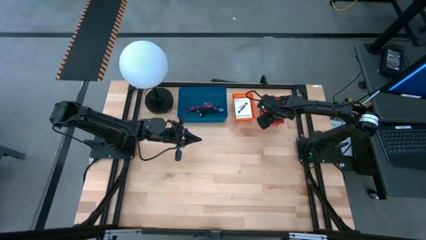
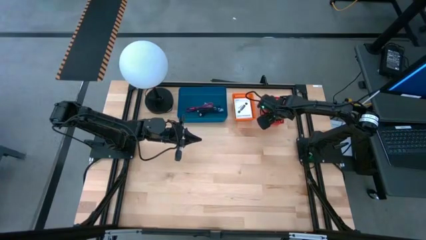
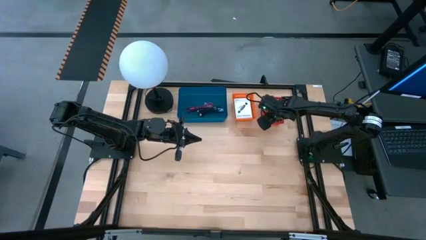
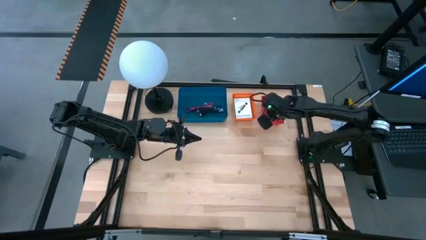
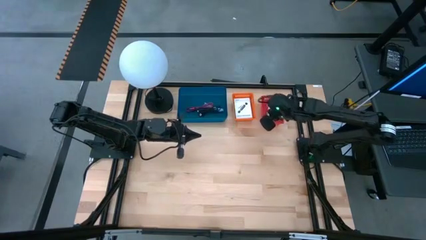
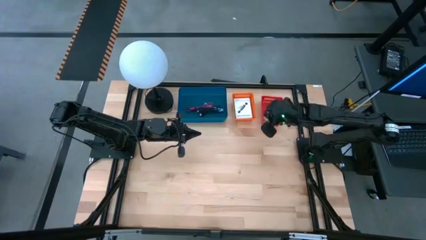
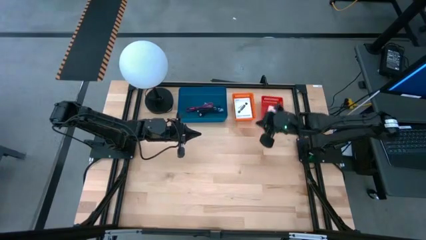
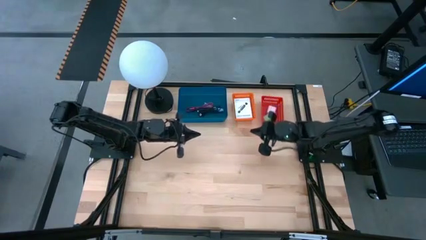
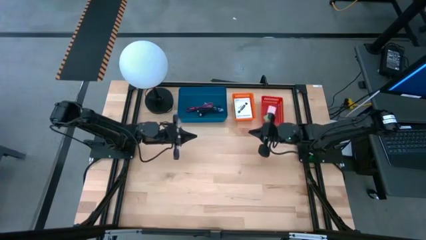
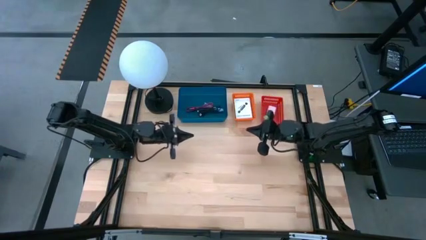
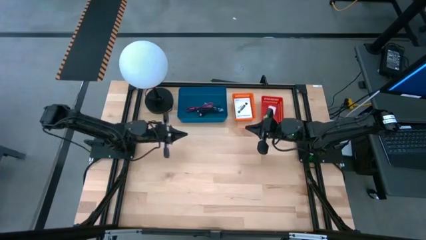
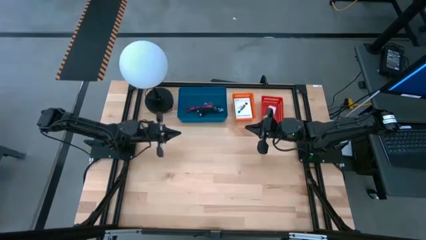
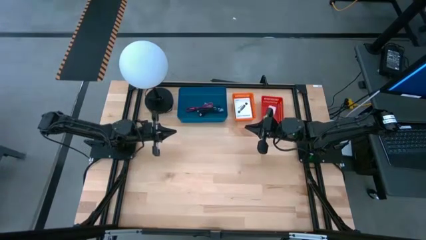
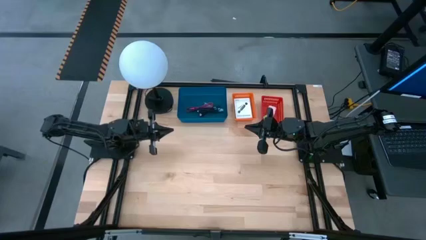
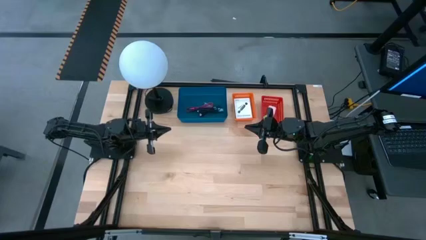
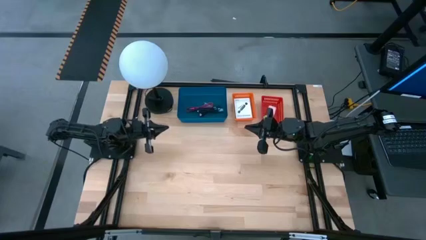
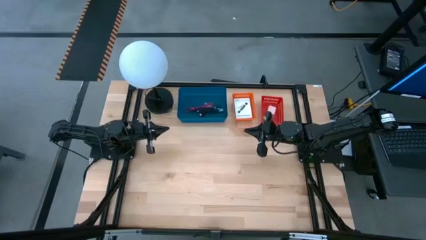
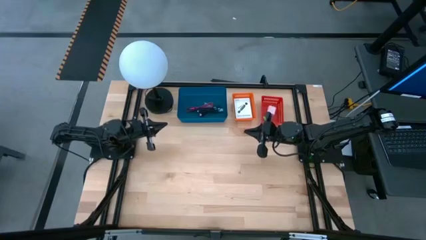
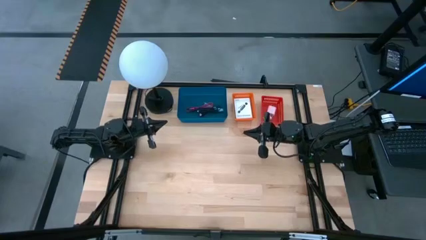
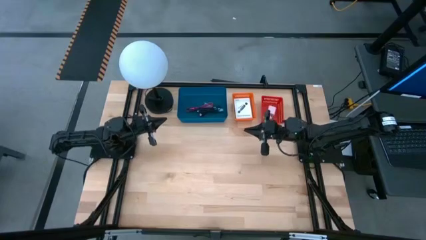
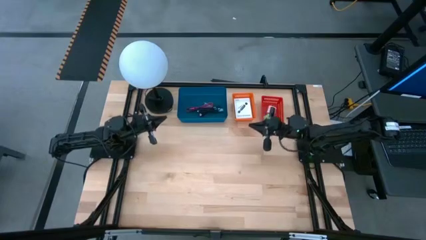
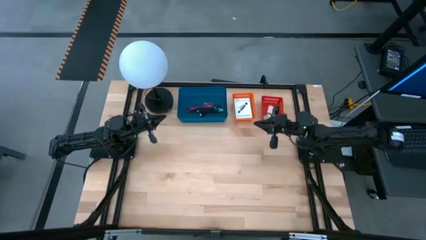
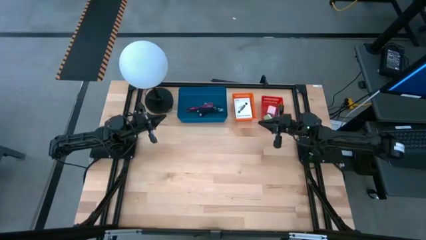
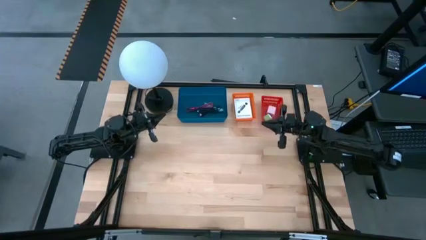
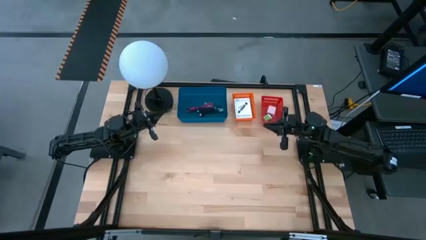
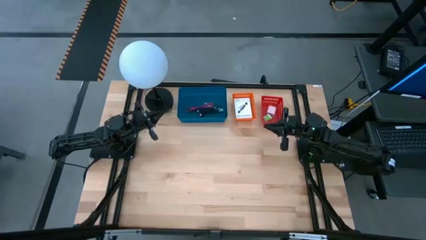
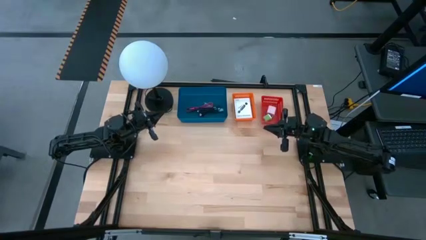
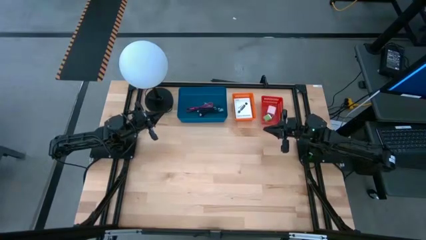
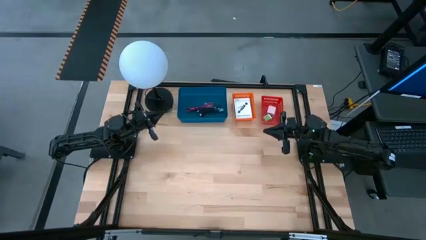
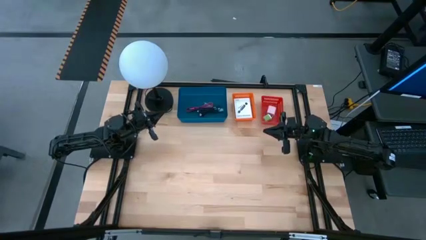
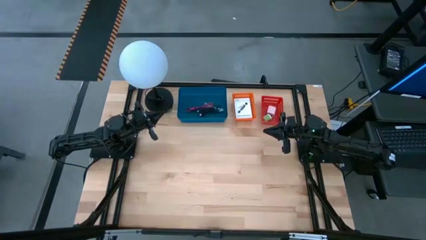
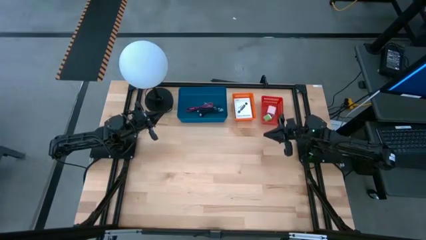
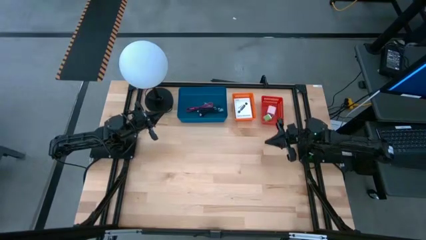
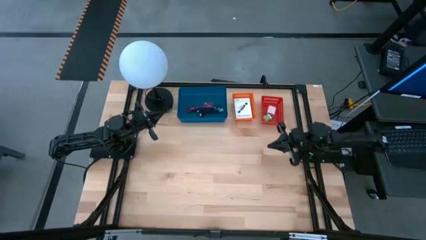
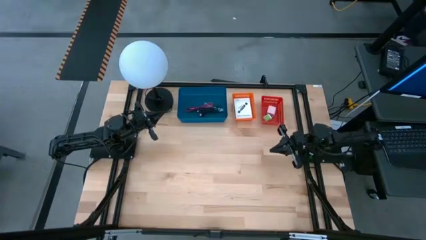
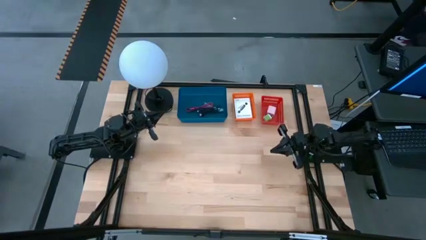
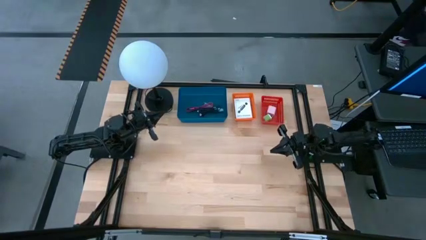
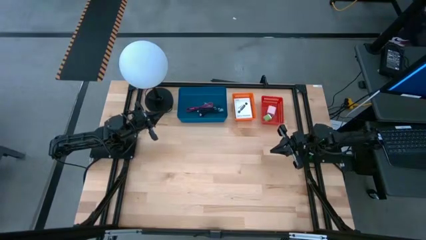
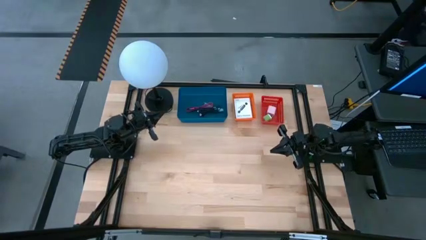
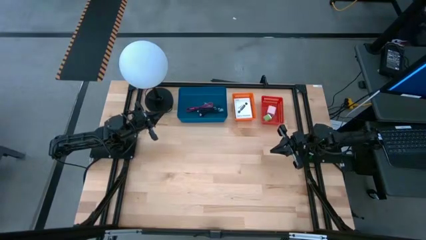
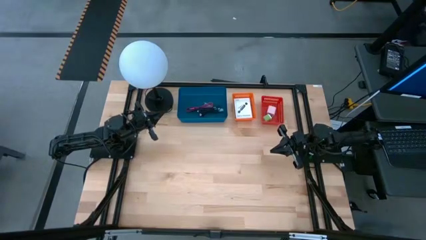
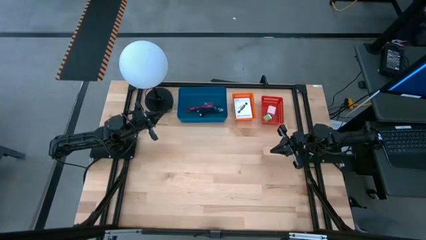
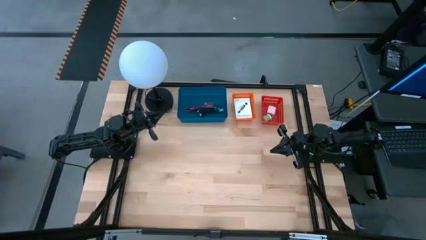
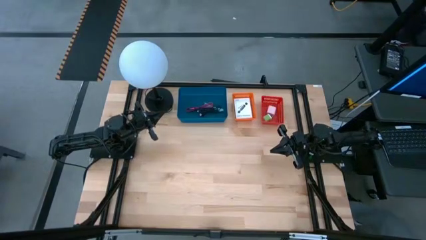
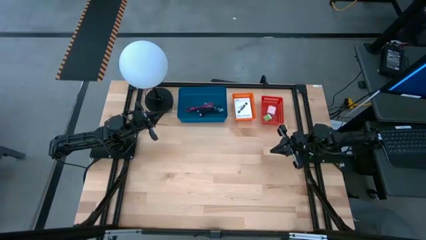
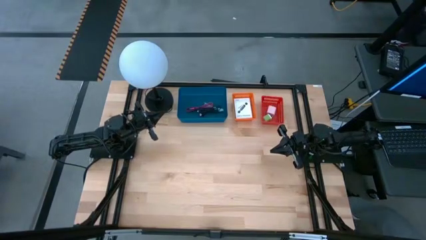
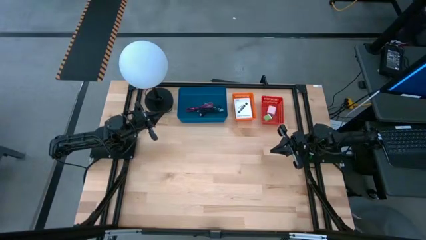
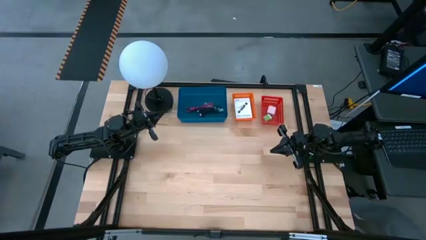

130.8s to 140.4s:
Task: Pick and place items into bin
Return to Home Position

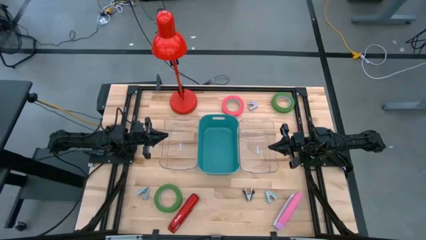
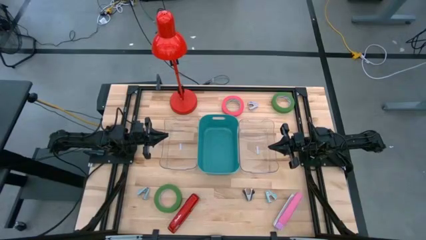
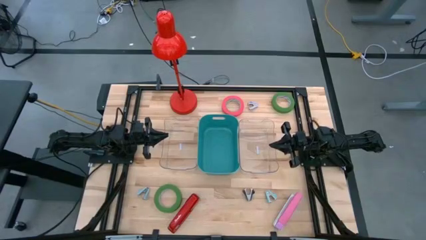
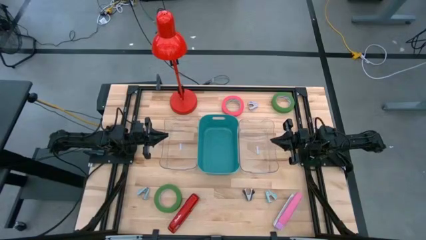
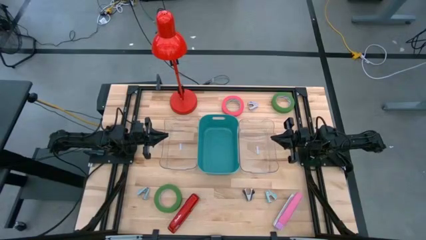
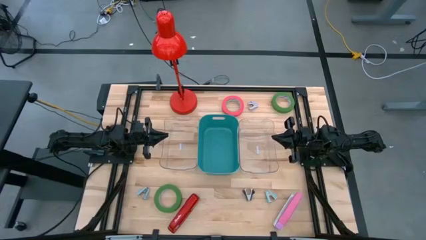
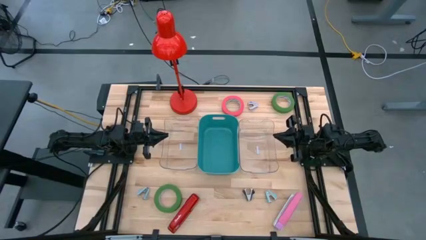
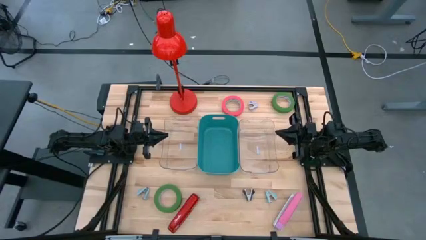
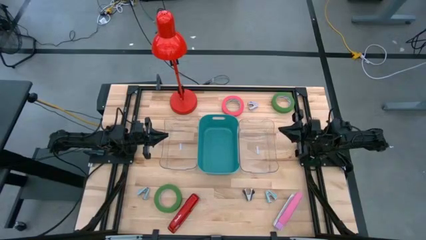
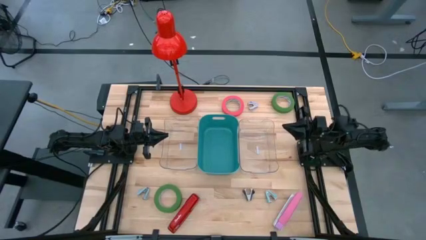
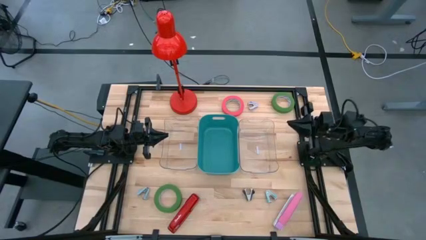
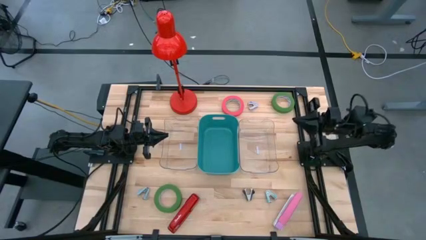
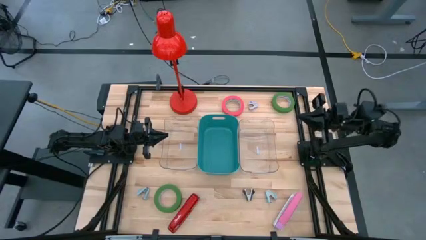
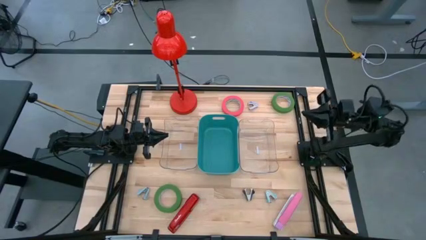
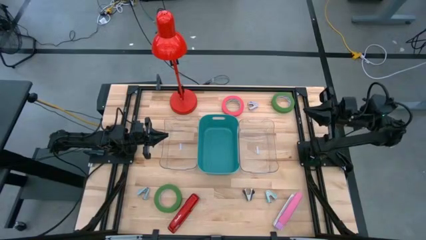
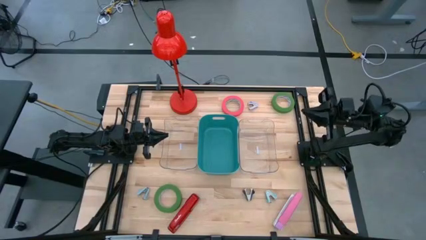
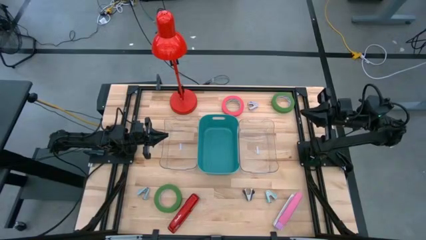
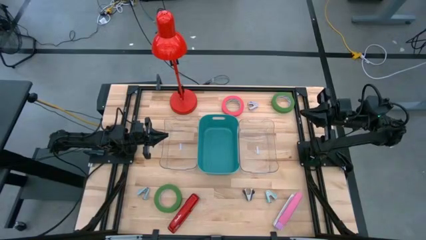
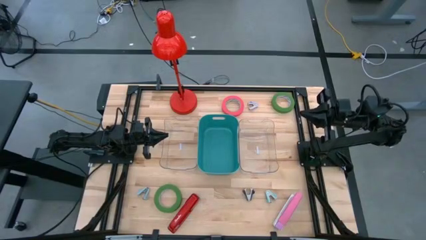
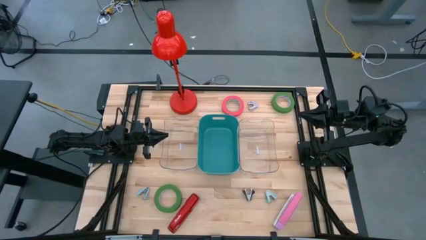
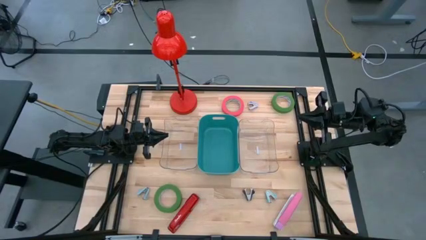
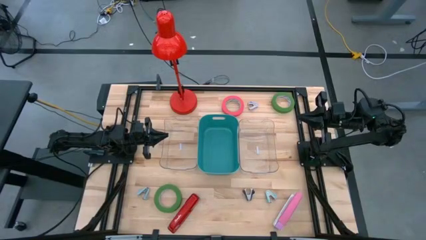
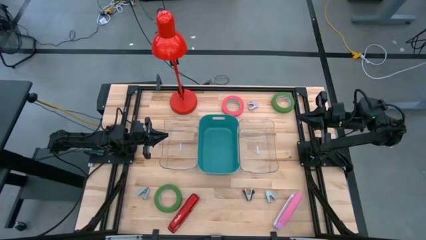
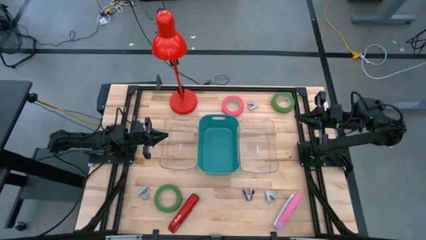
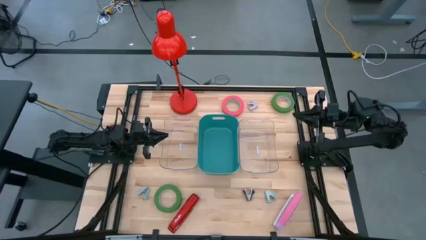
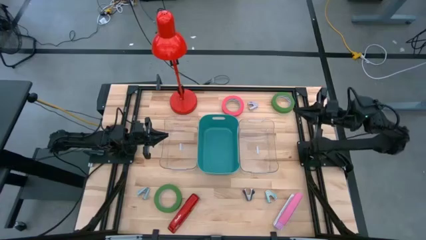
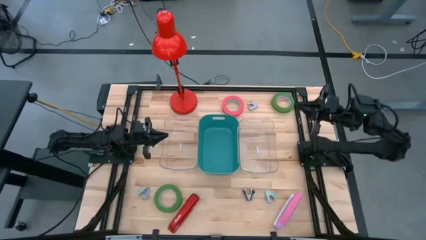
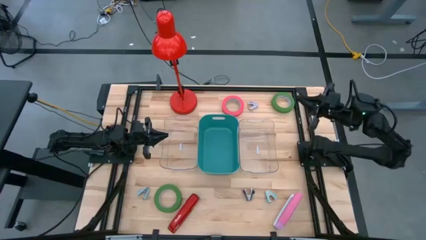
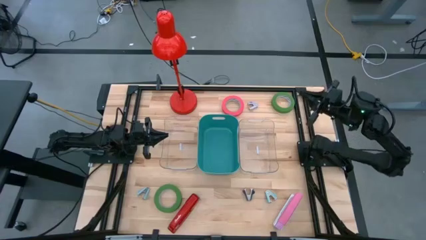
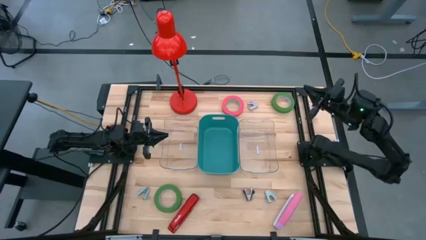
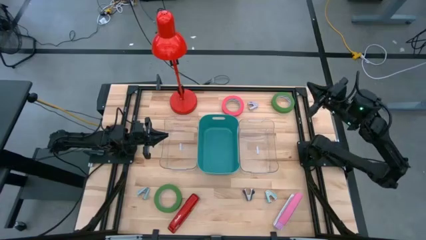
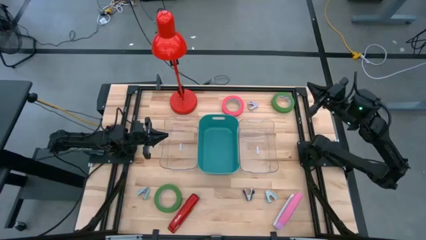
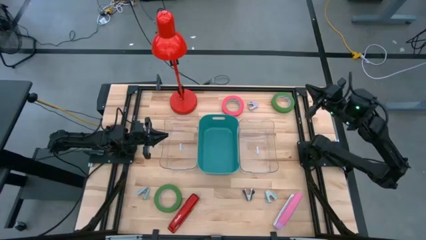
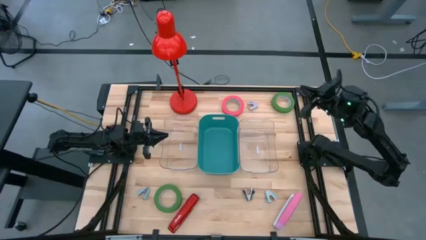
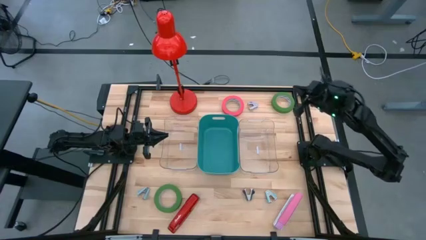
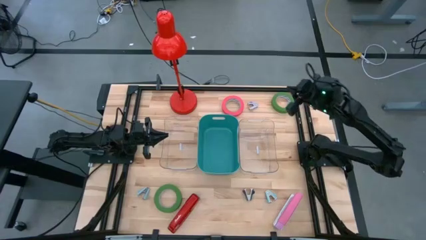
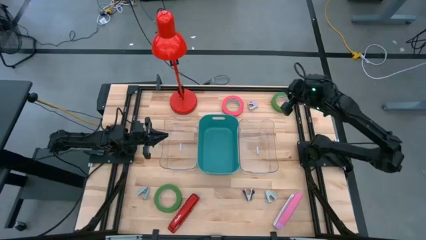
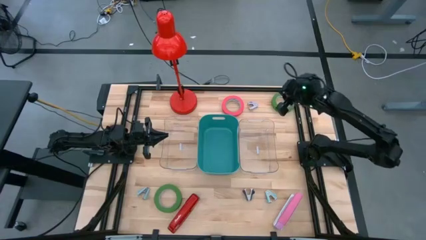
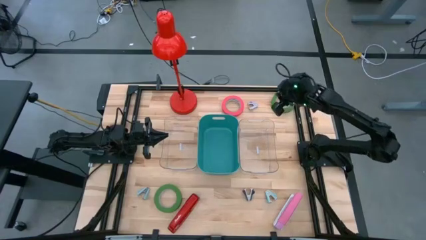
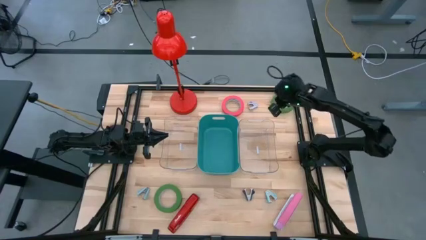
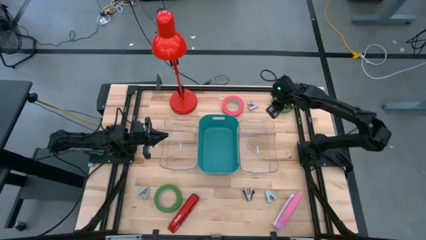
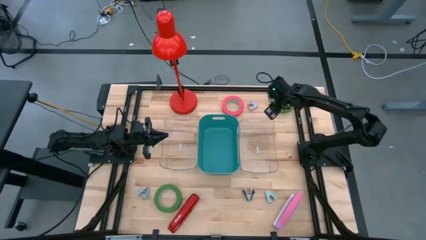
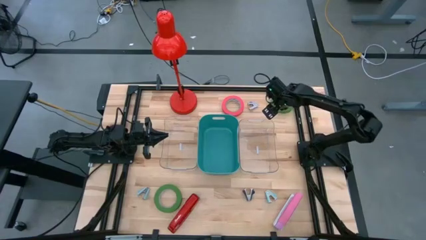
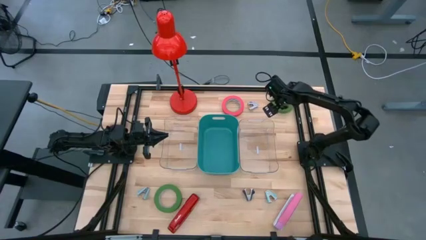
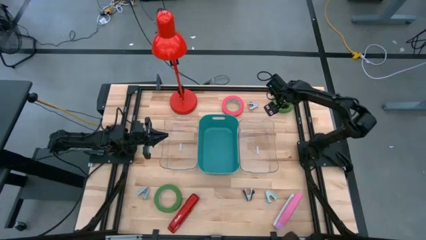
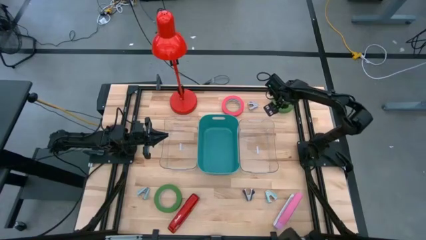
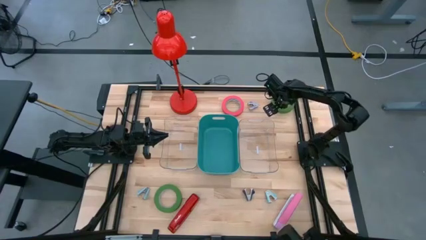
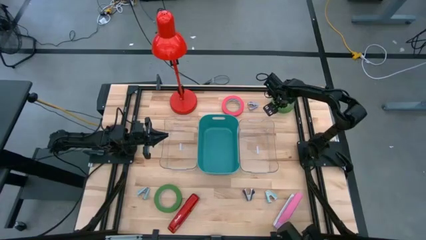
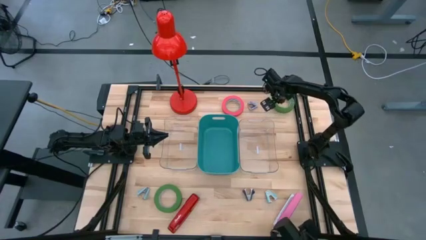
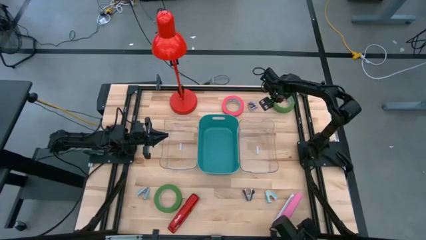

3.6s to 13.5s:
Task: Pick and place Stapler, Stapler remover, tape
Put the top green tape into the green bin
